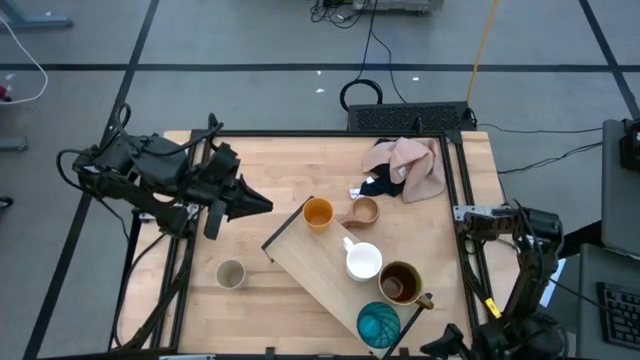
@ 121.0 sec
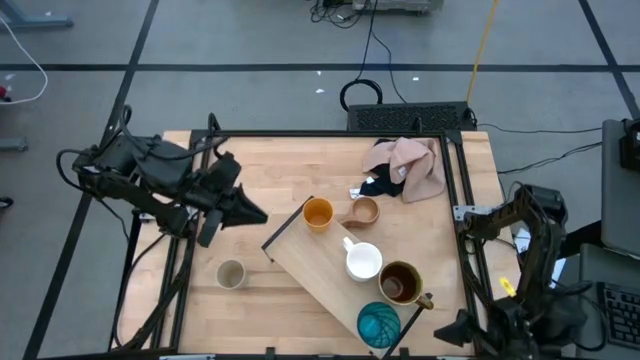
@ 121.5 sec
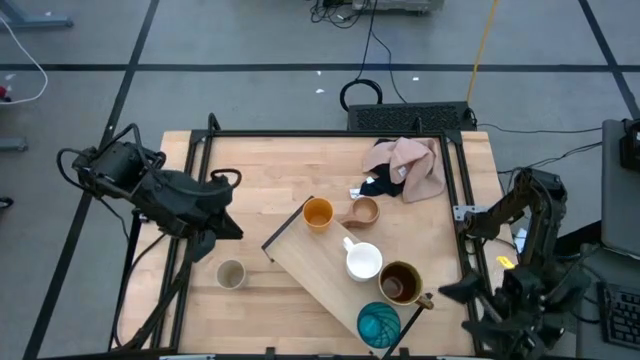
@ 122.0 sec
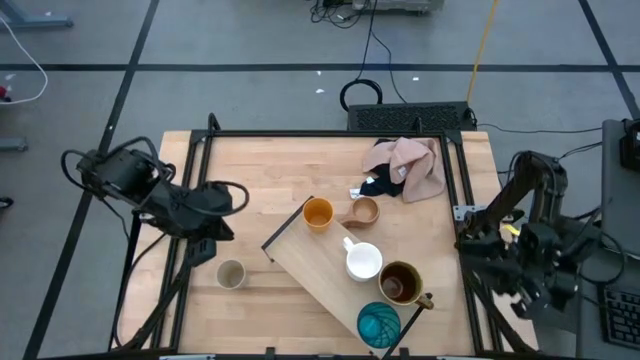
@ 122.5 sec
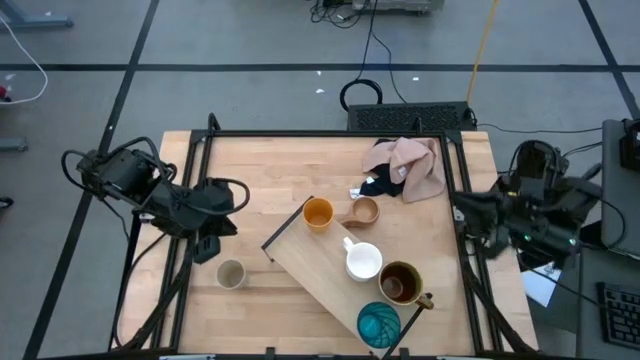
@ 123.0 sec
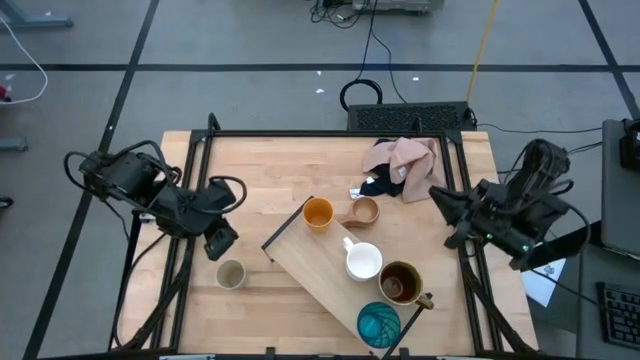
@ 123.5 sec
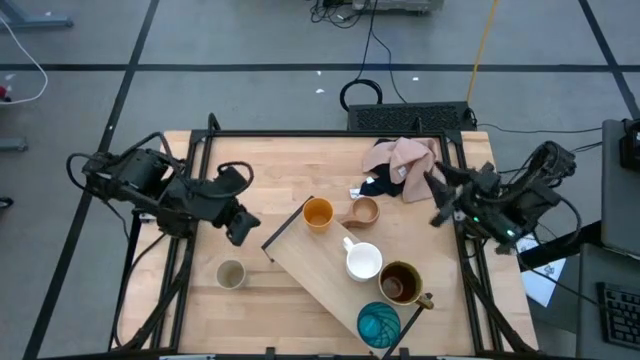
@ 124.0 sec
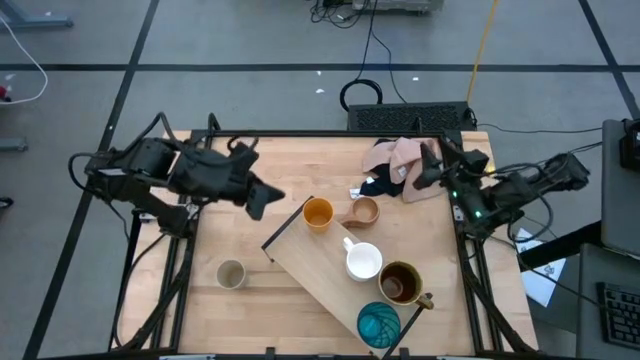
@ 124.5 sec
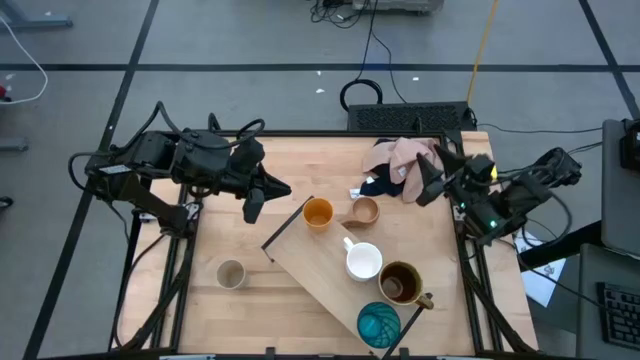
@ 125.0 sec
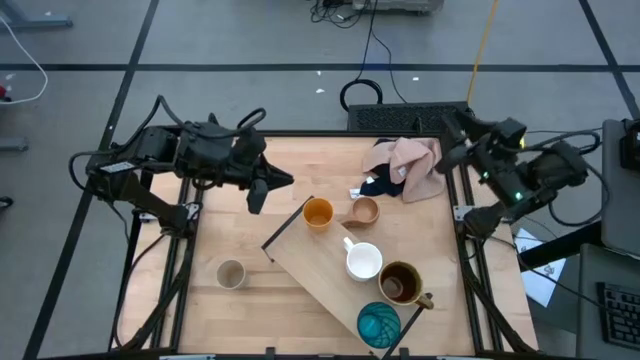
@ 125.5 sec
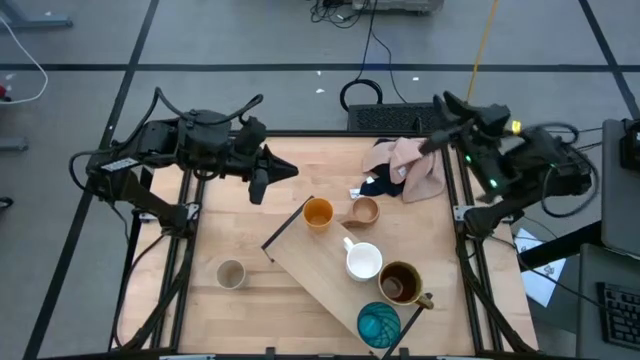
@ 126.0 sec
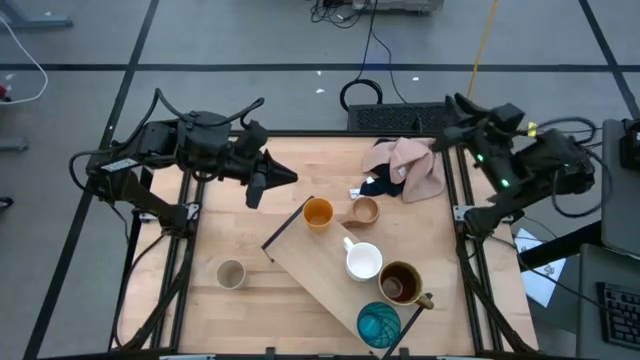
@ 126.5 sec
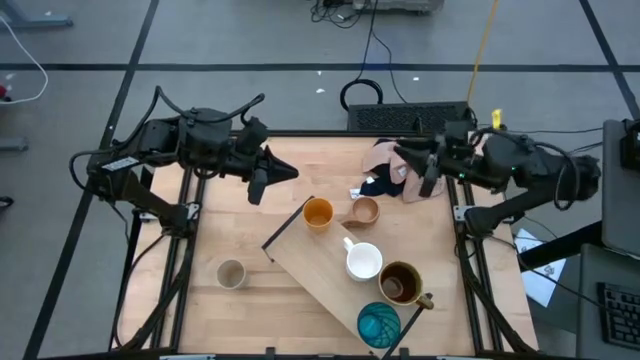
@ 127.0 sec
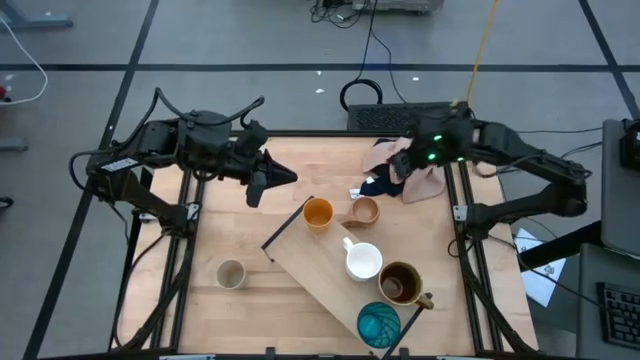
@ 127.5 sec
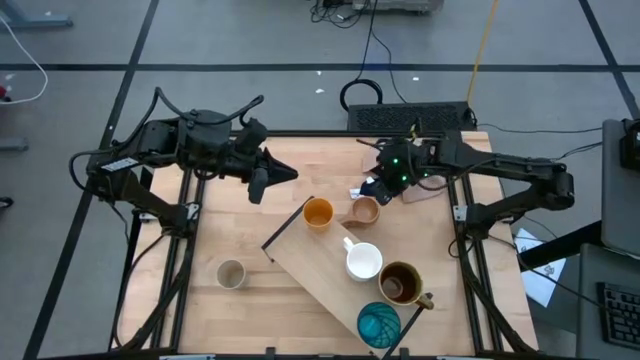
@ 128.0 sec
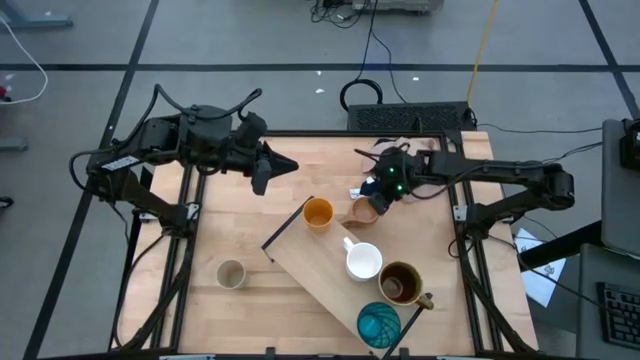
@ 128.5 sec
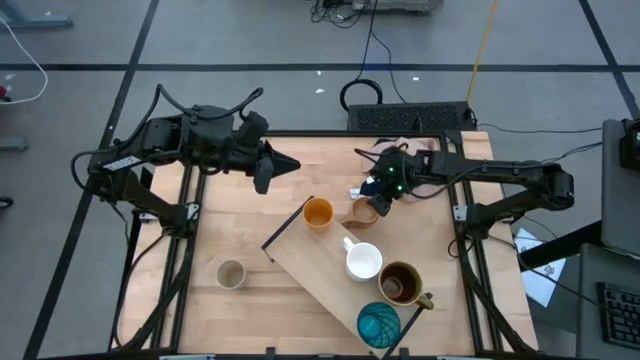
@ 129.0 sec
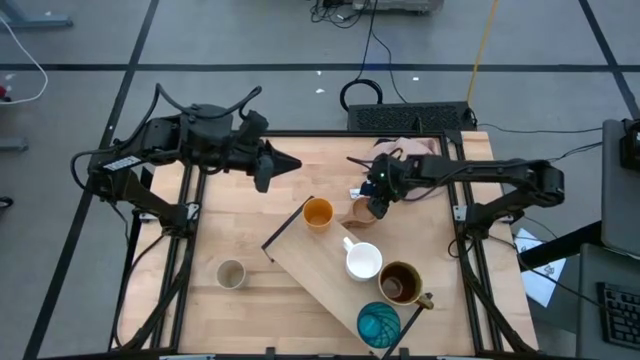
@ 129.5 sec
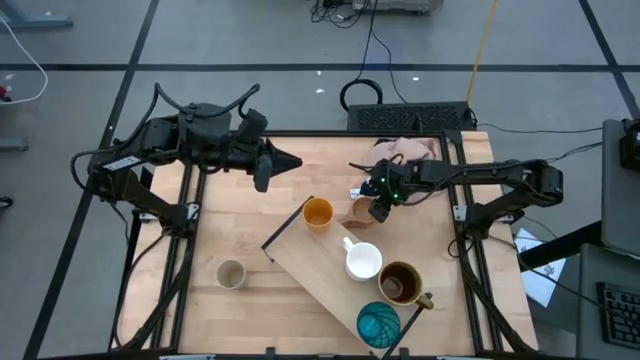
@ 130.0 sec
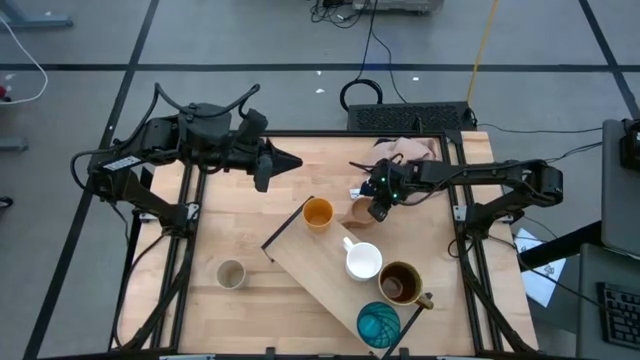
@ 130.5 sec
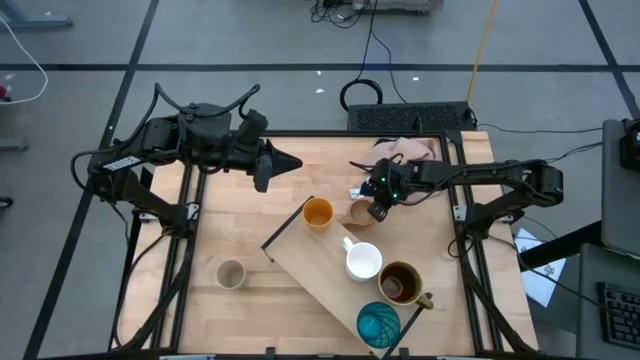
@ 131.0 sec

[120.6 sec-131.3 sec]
Task: Stack small to large cups/mugs on shelf
Put the brown wooden mug on the shelf

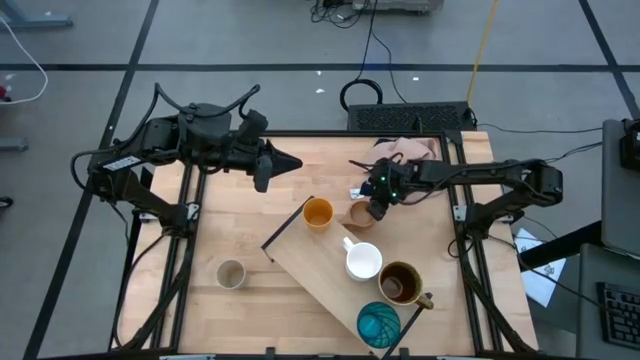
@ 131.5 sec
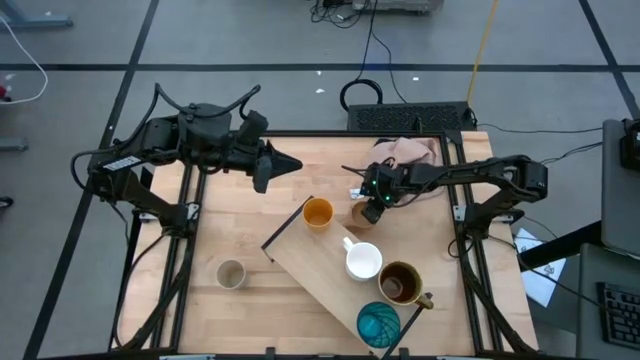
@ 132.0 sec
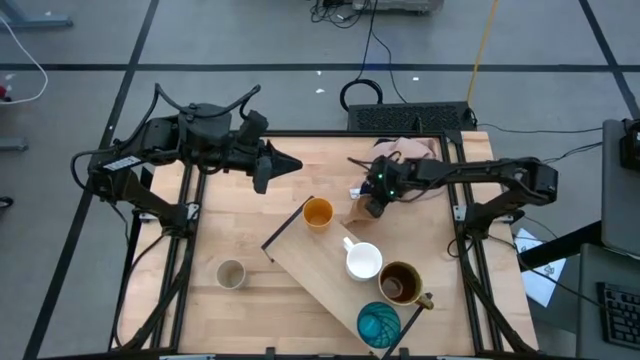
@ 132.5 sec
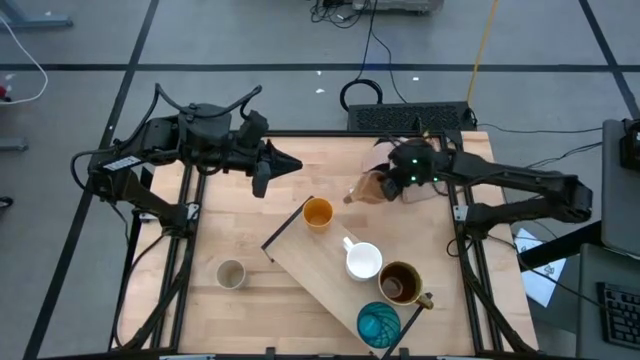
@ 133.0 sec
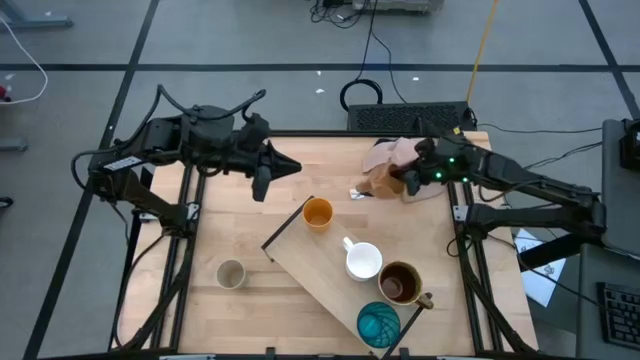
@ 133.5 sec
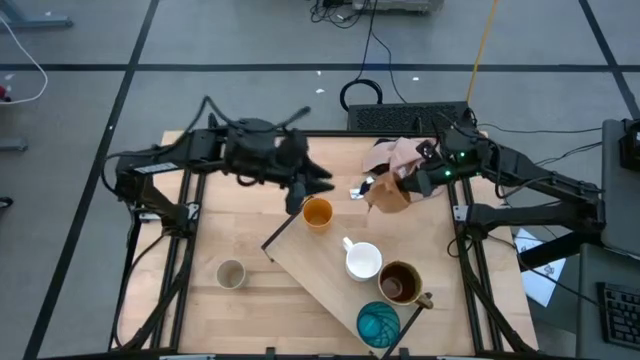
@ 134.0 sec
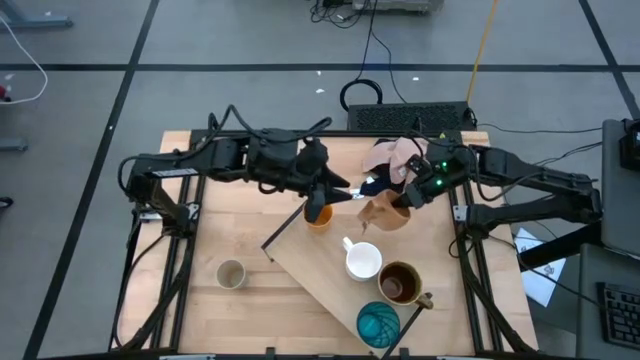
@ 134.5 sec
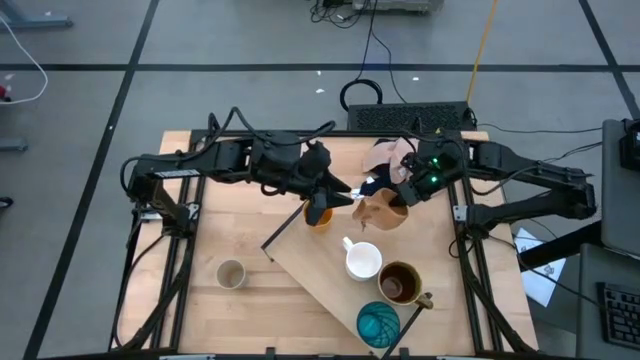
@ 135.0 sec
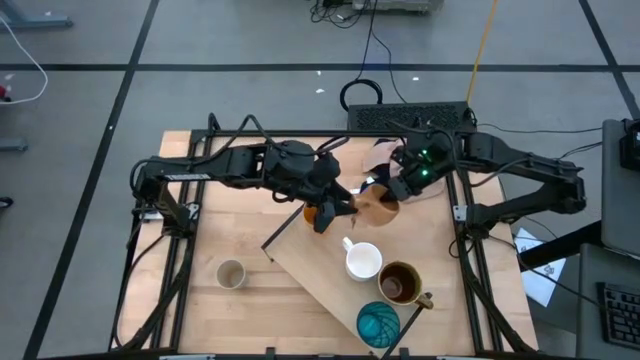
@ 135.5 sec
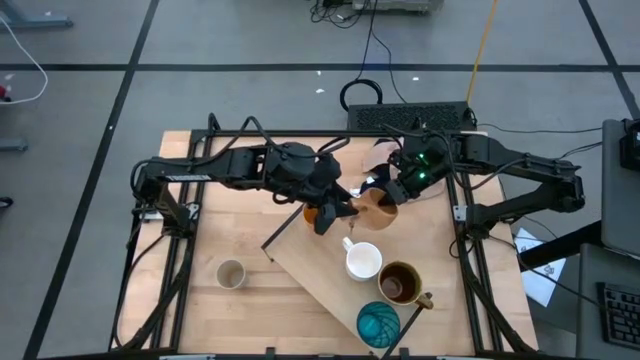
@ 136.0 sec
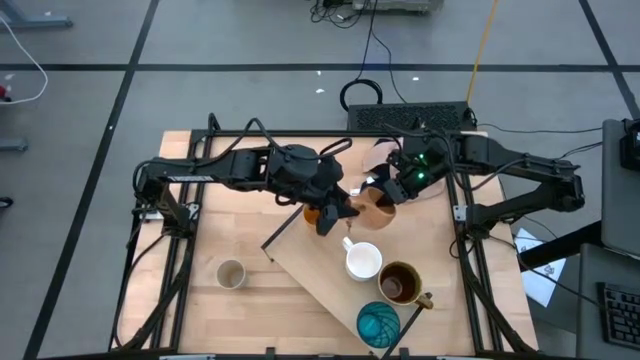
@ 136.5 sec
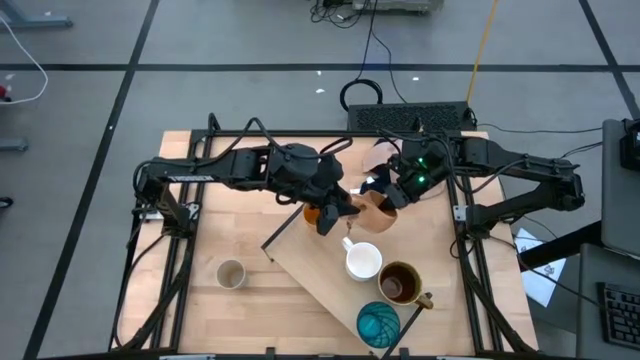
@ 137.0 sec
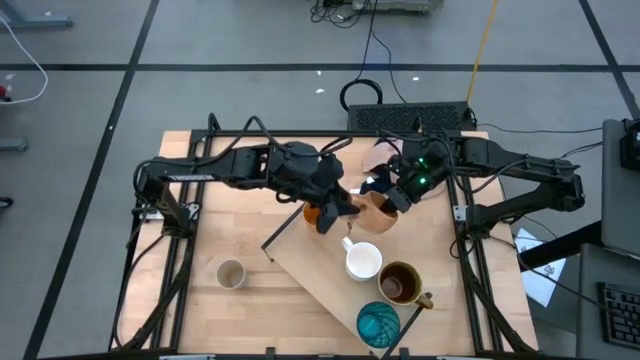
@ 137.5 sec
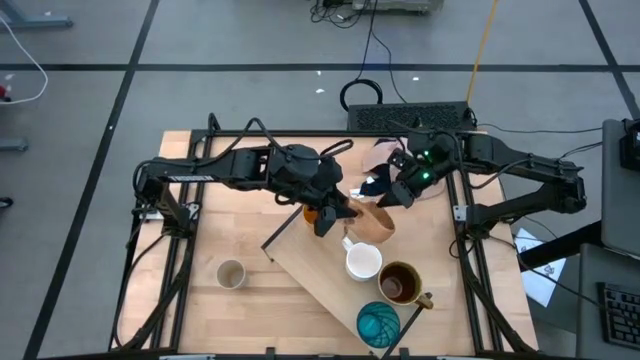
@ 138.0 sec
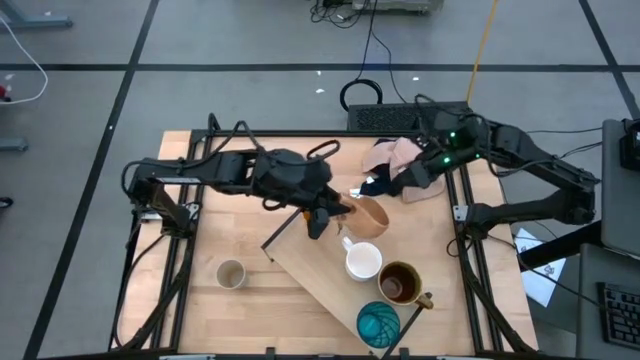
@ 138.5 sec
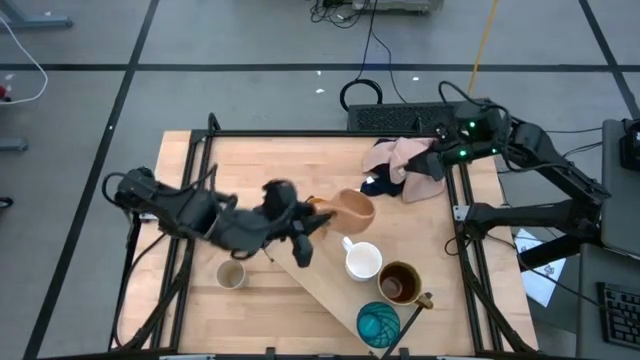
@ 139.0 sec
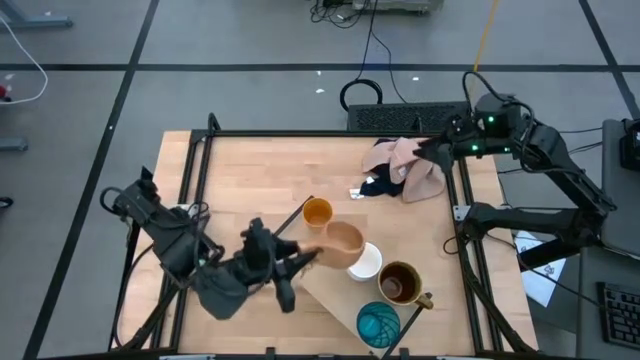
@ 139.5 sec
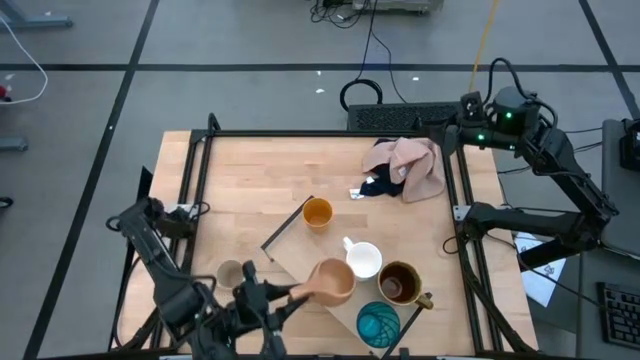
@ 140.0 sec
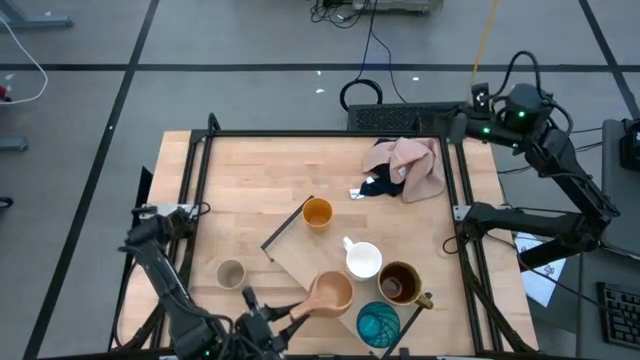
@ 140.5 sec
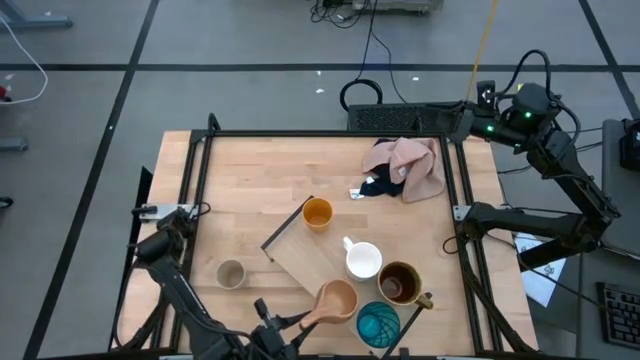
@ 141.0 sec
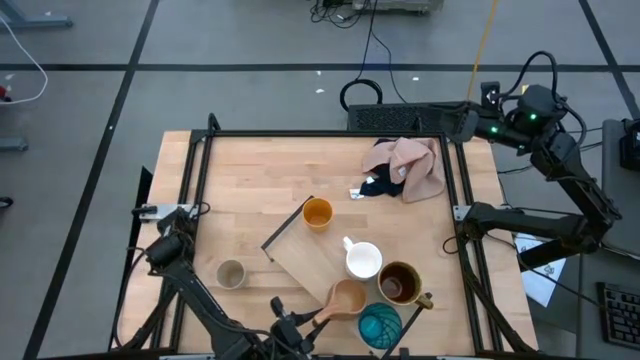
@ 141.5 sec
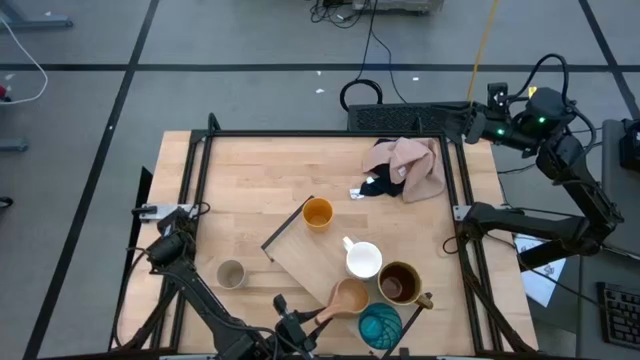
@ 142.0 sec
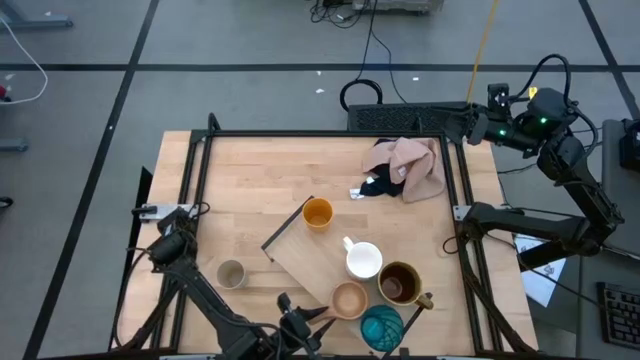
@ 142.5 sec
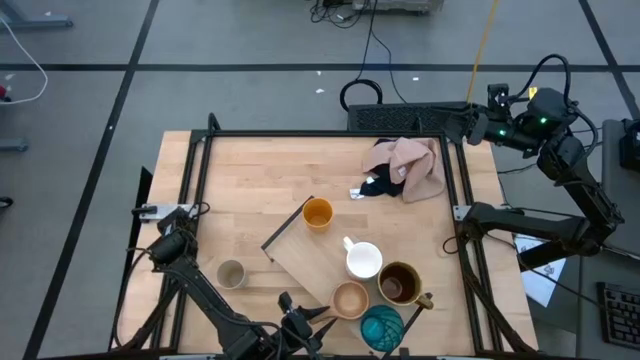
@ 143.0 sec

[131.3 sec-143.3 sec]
Put the brown wooden mug on the shelf
